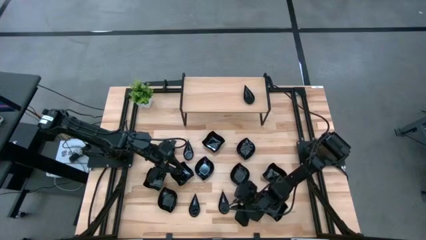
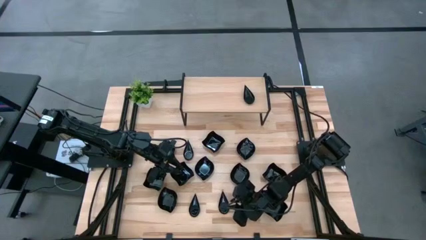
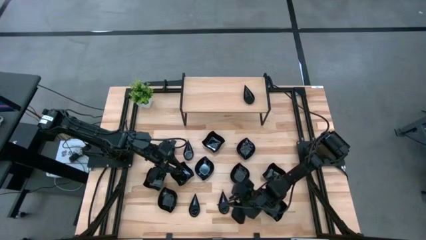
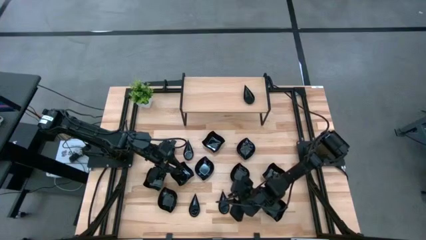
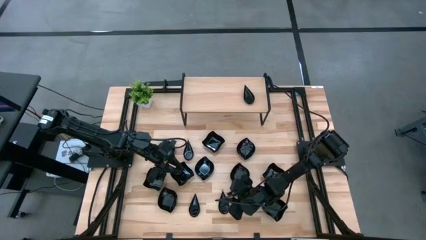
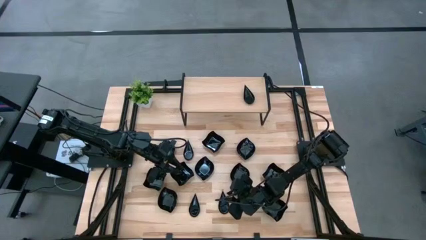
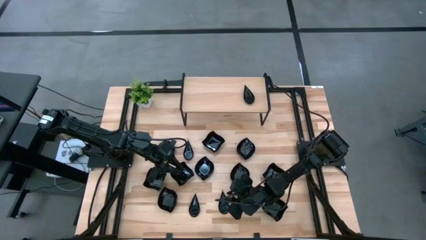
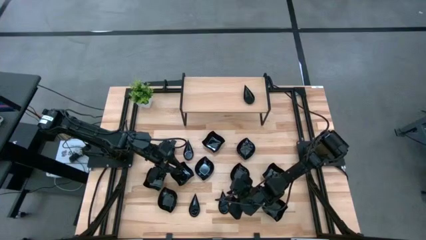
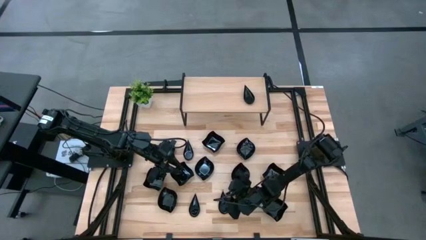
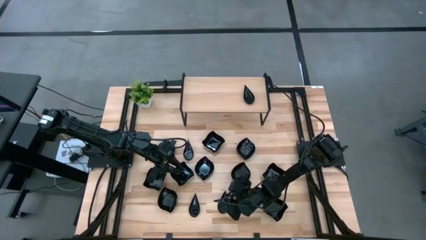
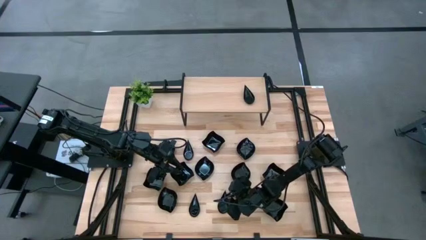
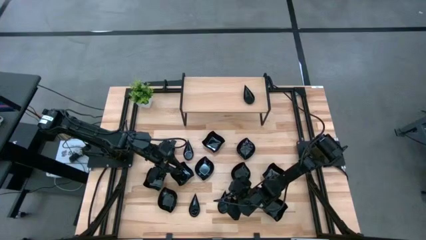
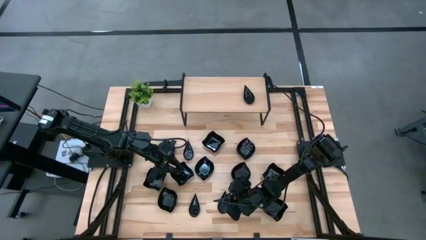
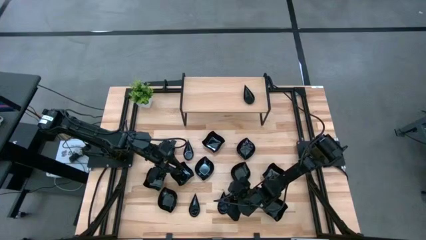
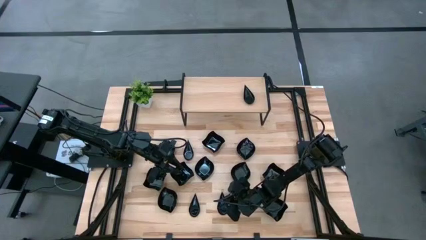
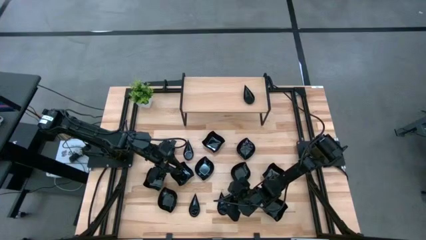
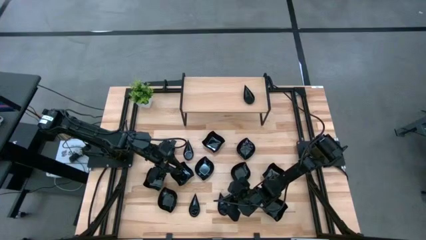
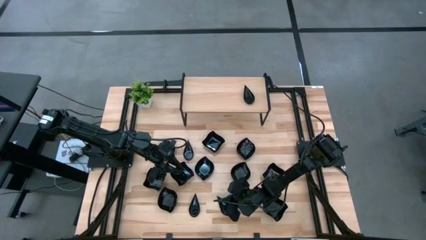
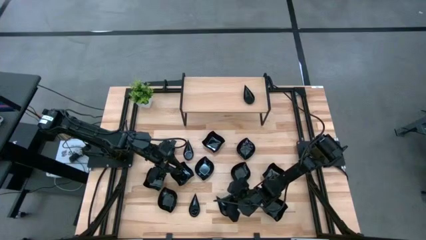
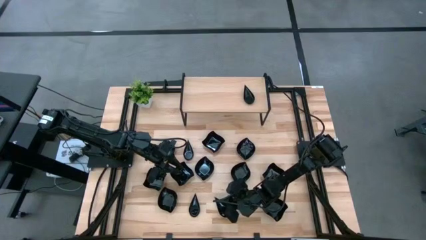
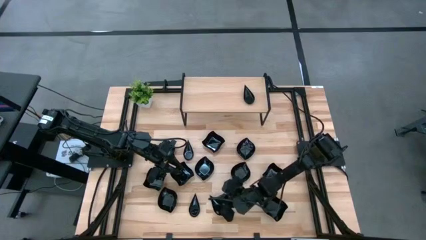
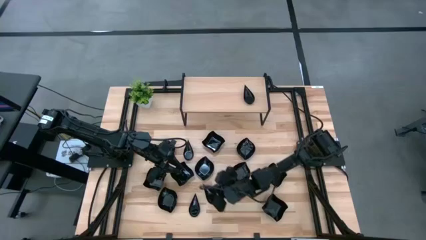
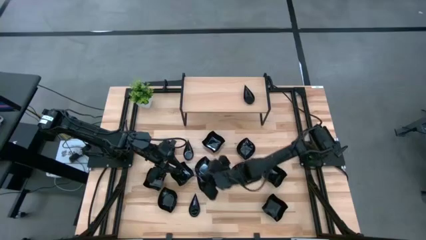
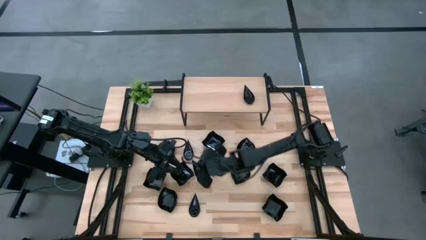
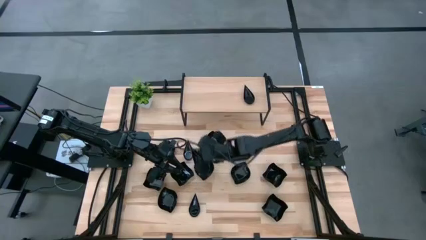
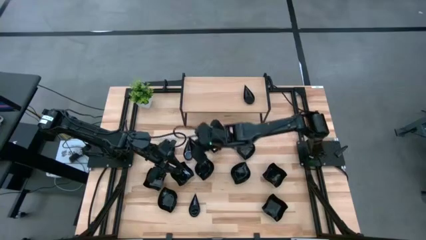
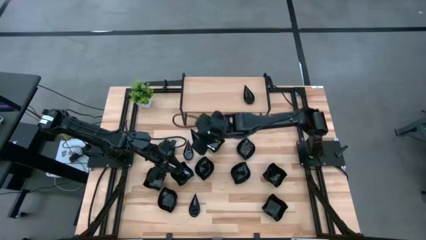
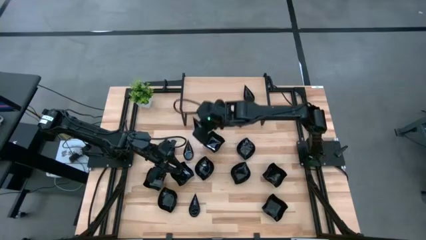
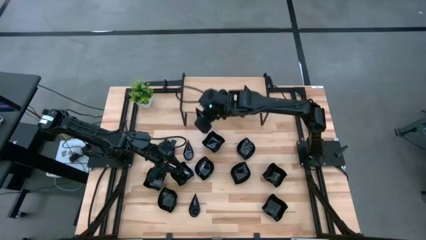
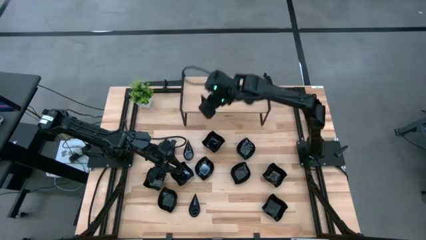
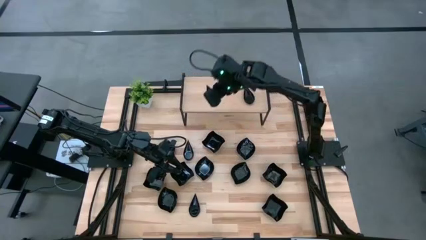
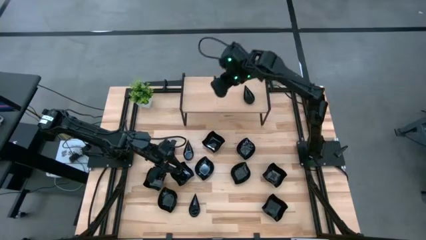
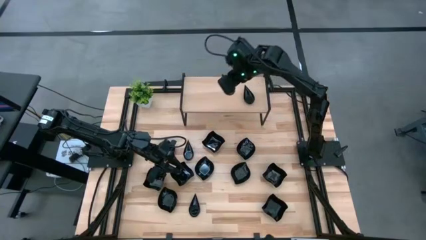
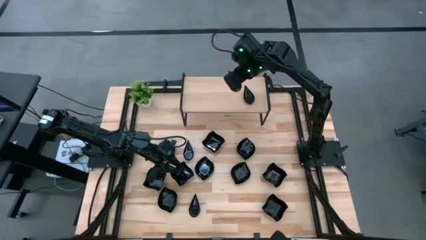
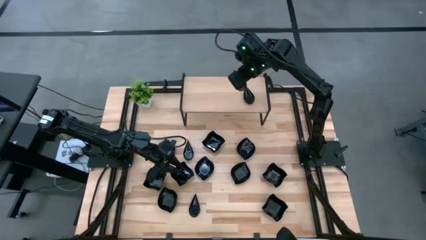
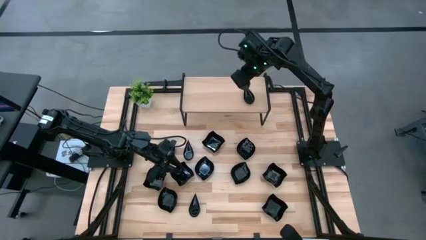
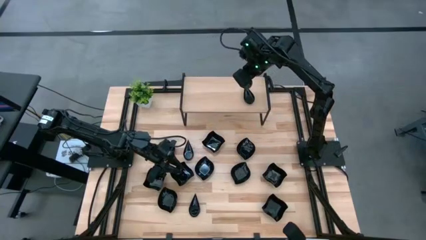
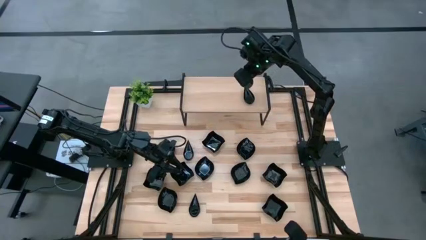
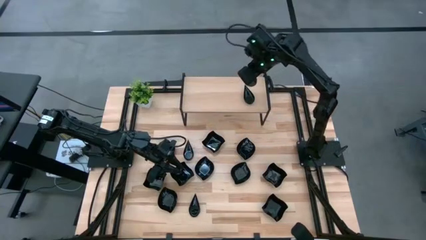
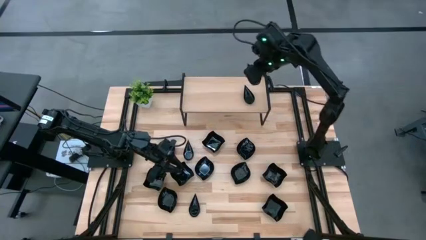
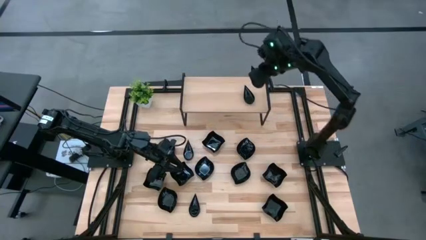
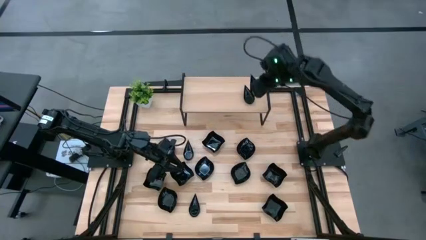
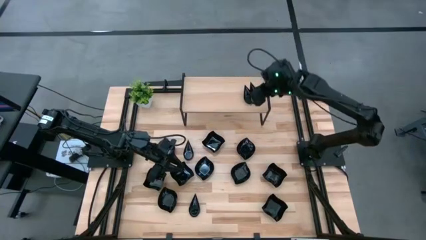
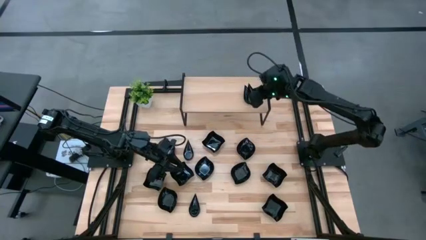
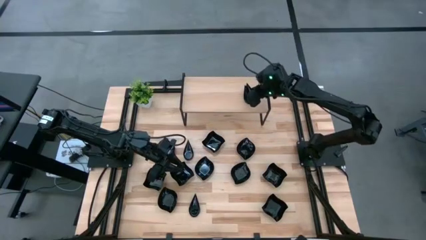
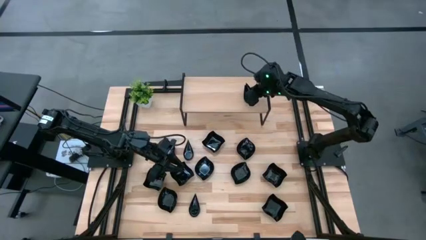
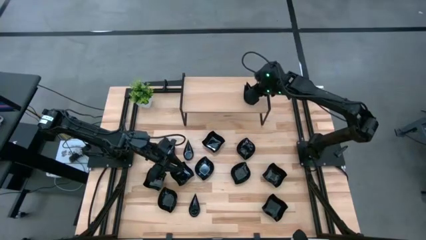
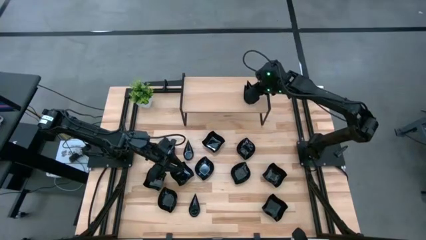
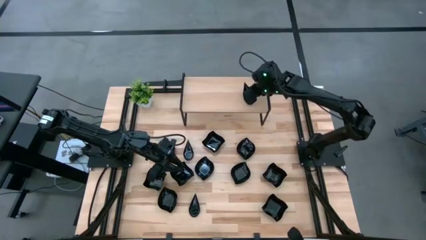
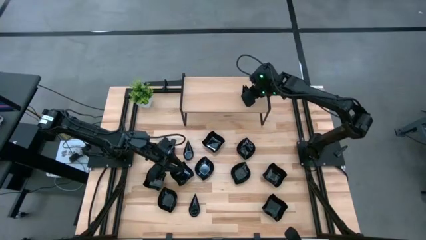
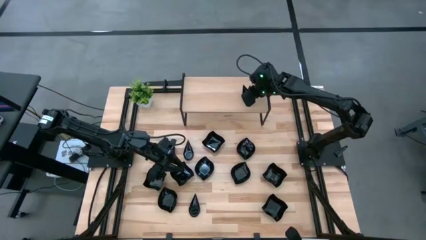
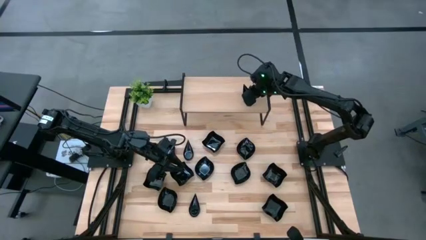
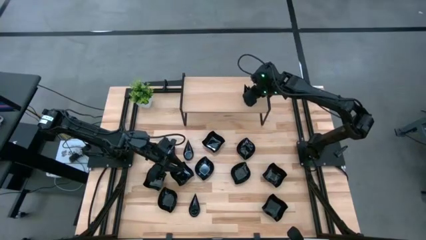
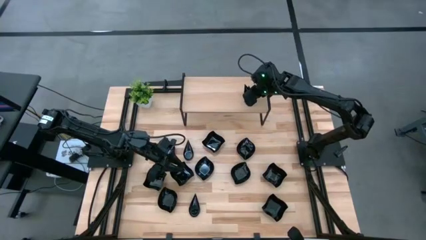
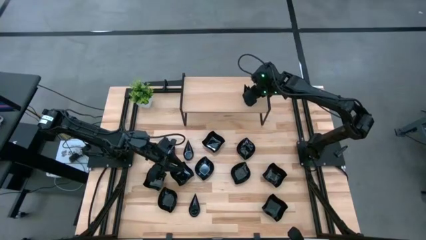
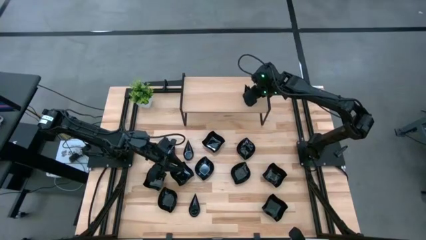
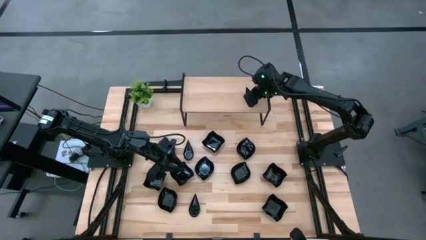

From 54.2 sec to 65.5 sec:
Task: Pick & Place Mini shaped plates
Stack the black drop shaped plate on top of the black drop shaped plate on the shelf
